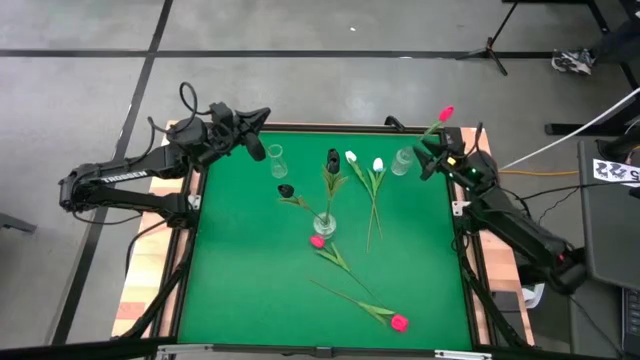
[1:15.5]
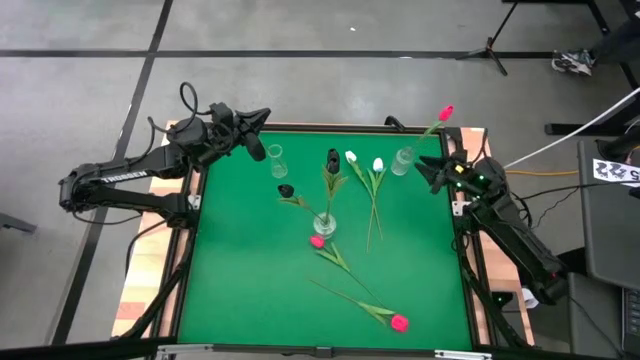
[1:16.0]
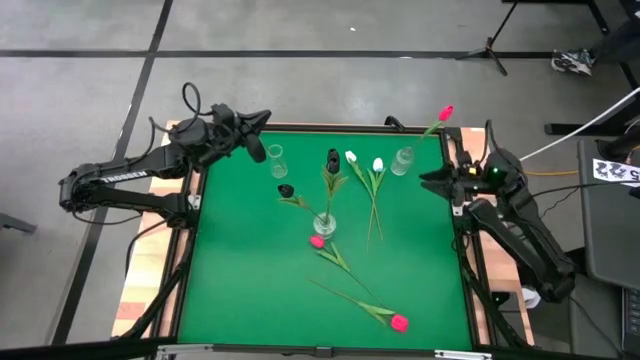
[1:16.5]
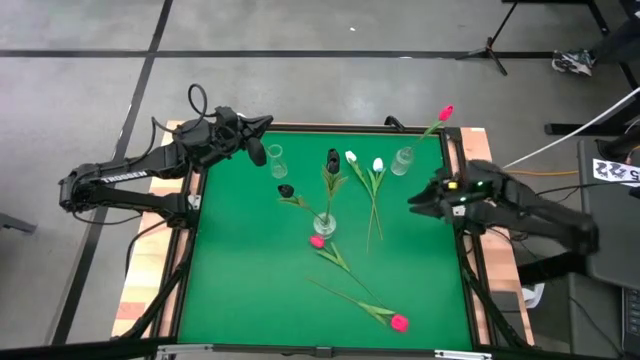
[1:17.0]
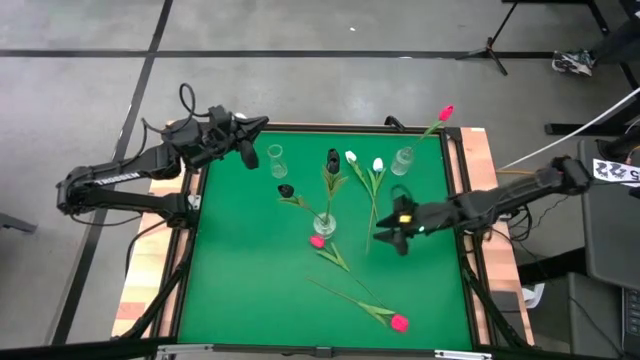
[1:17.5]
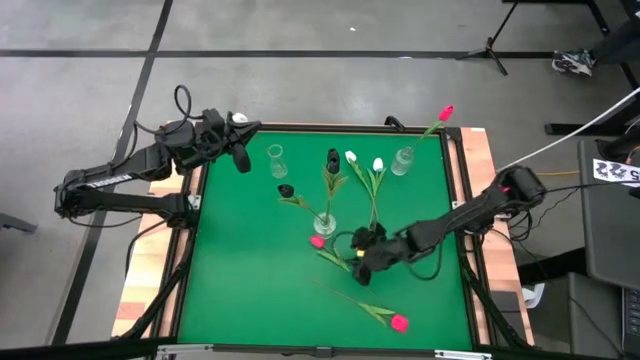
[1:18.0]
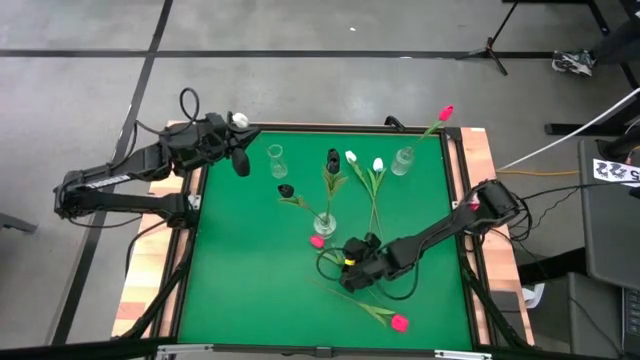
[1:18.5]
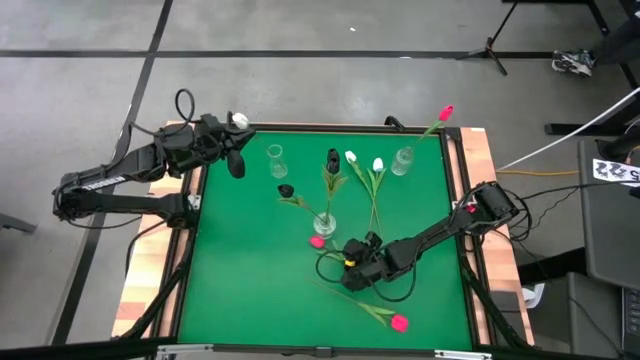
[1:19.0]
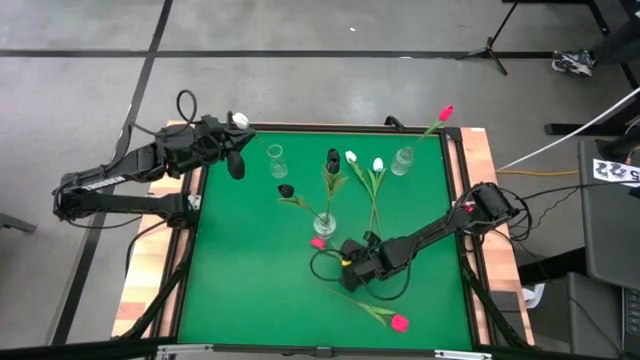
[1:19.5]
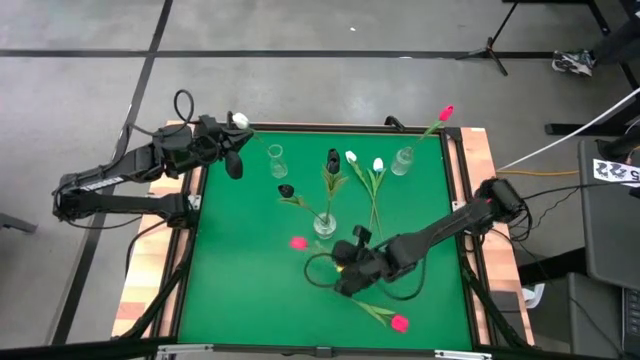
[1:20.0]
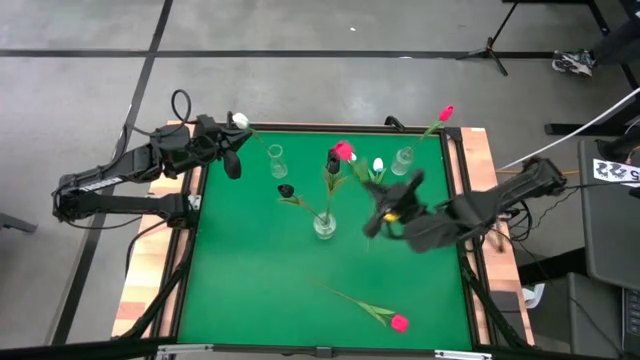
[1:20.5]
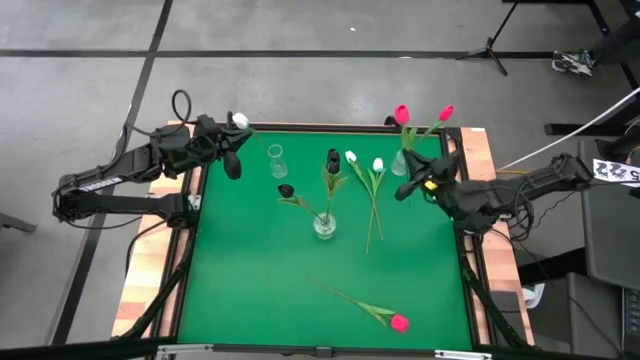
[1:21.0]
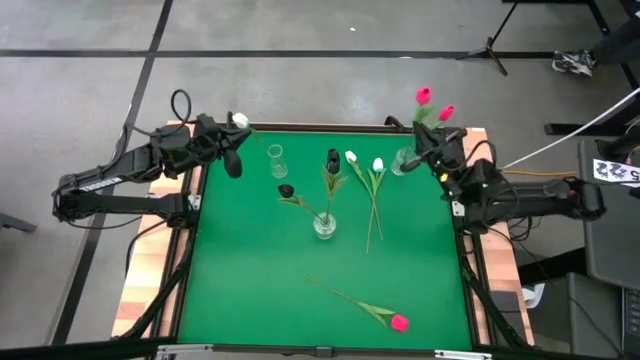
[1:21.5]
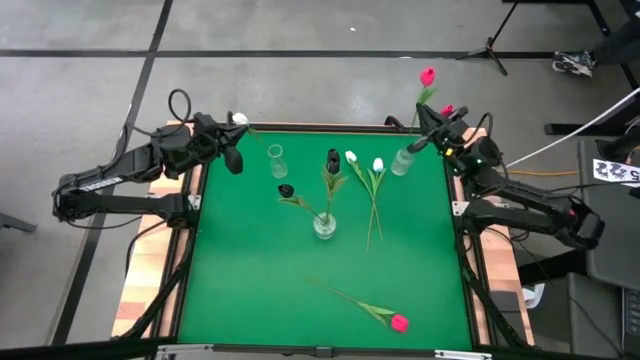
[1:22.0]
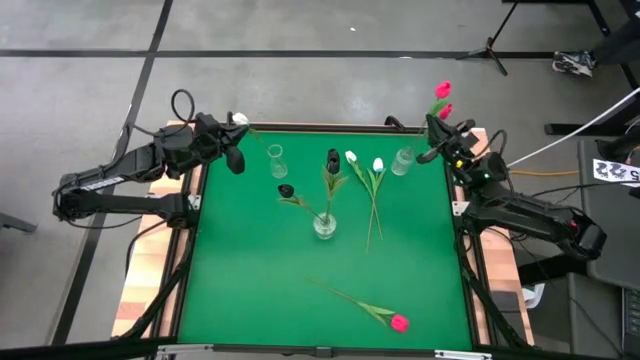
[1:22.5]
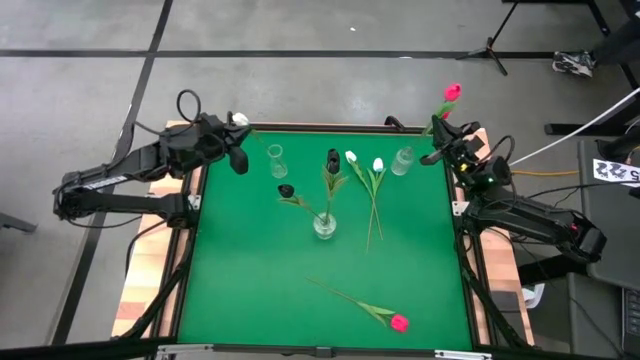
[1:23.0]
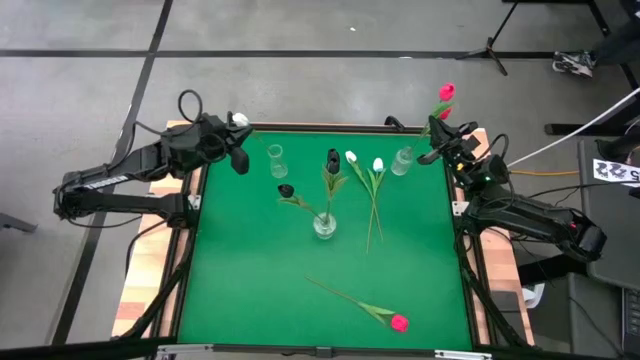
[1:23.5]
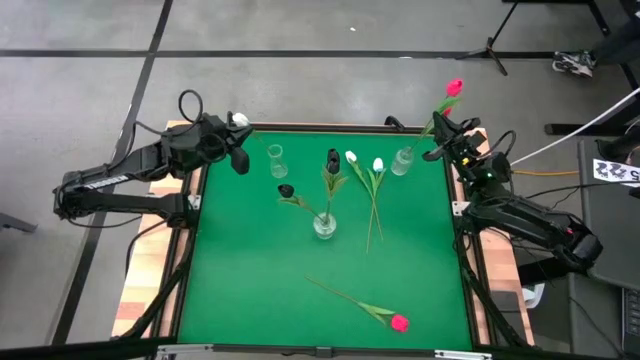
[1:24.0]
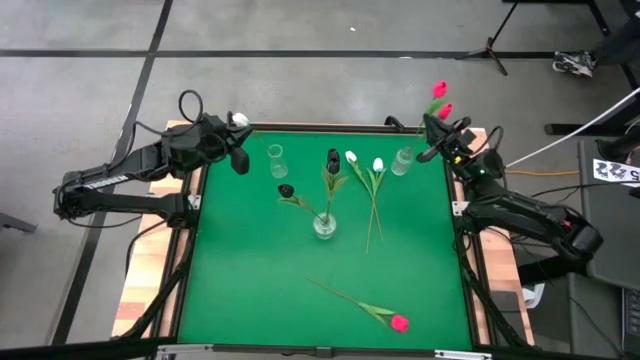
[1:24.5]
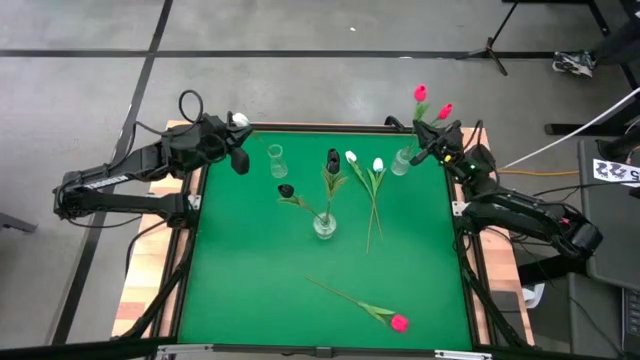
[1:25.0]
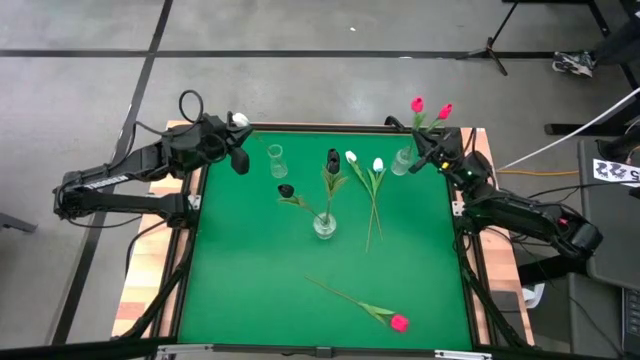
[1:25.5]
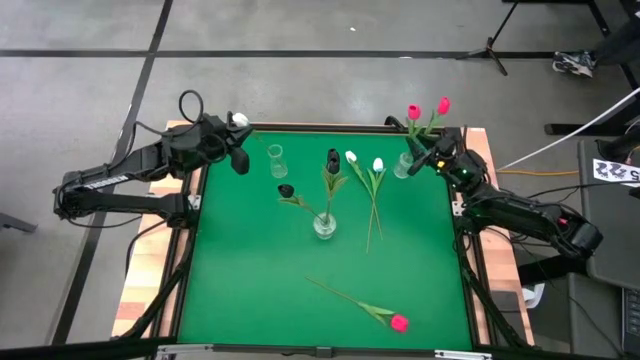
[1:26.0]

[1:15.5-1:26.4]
Task: Sort flowers into vase by color
Put the top pink tulip into the top right transparent vase

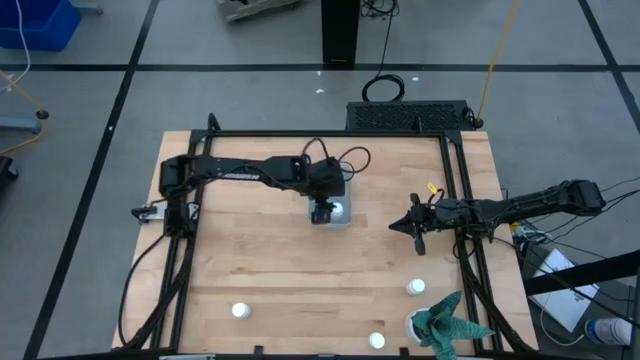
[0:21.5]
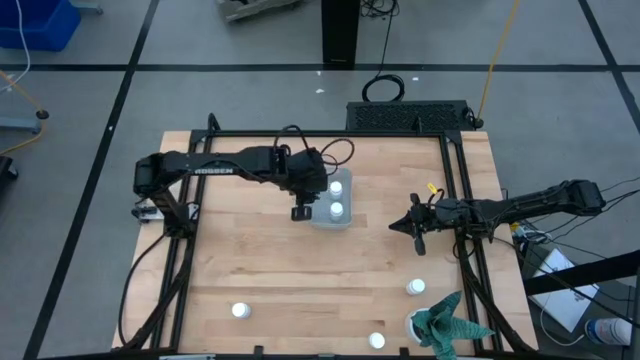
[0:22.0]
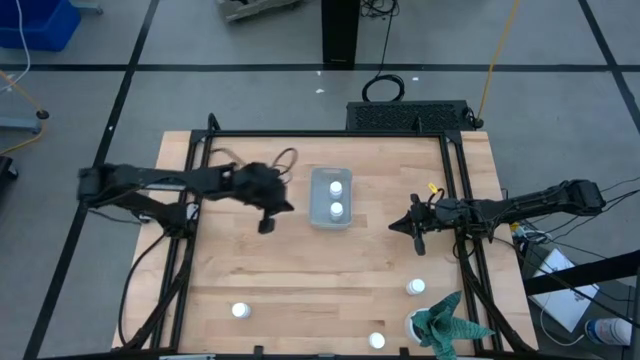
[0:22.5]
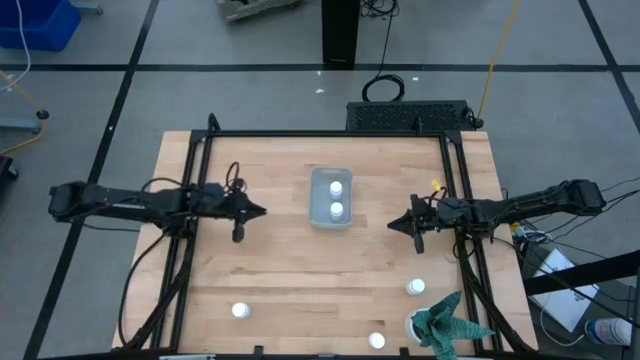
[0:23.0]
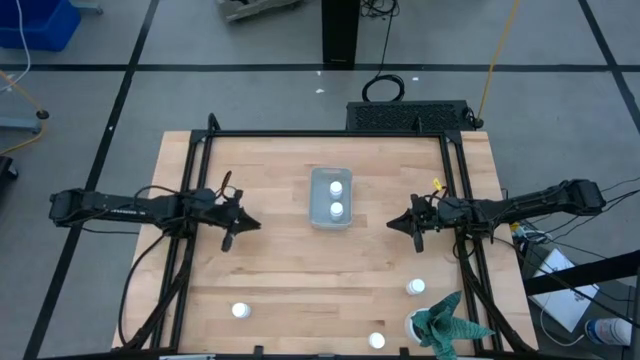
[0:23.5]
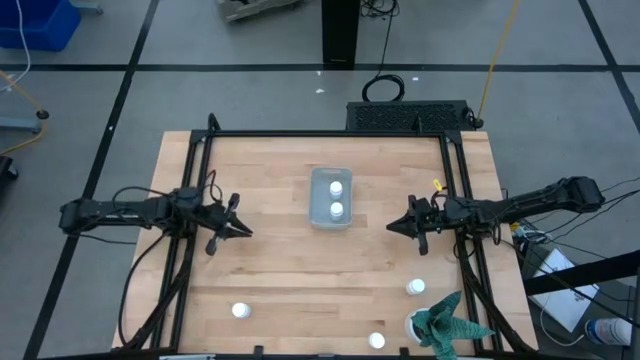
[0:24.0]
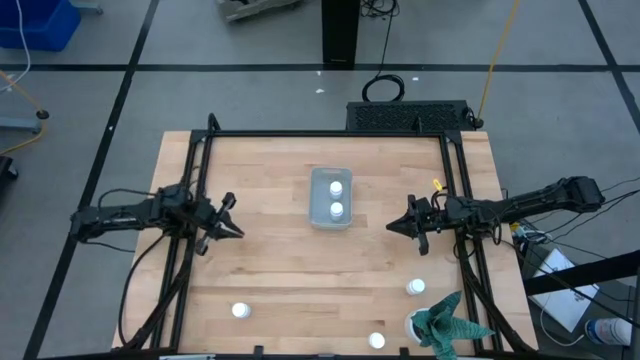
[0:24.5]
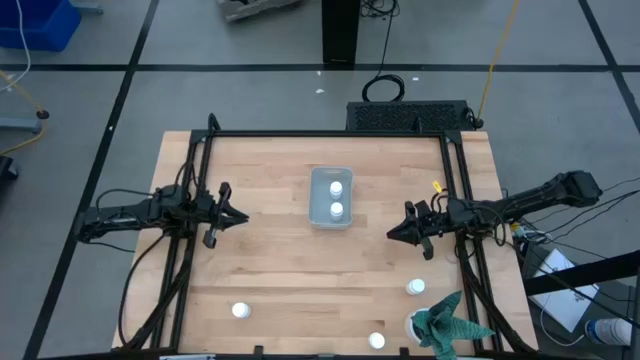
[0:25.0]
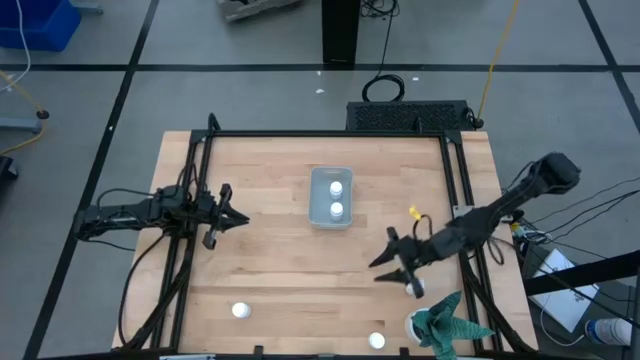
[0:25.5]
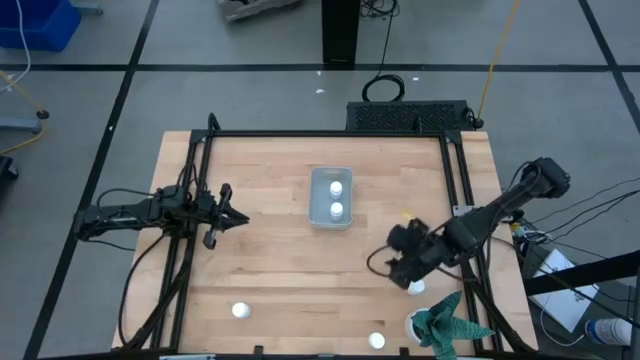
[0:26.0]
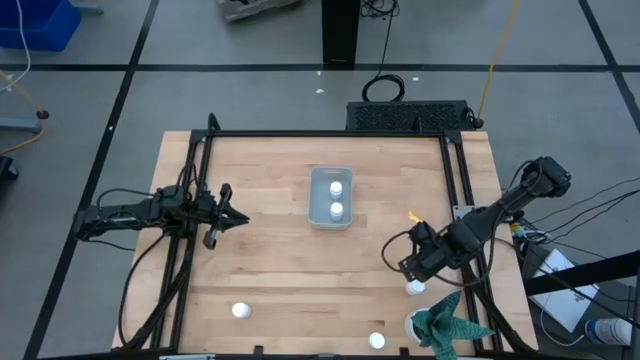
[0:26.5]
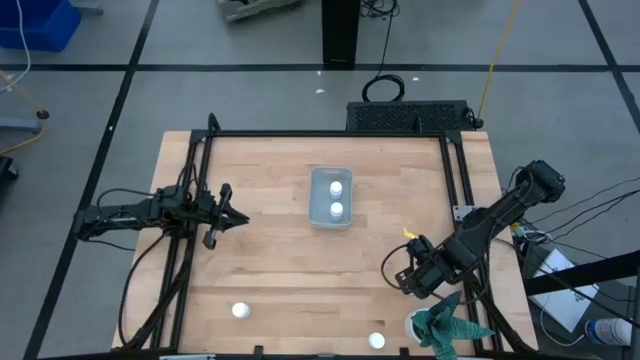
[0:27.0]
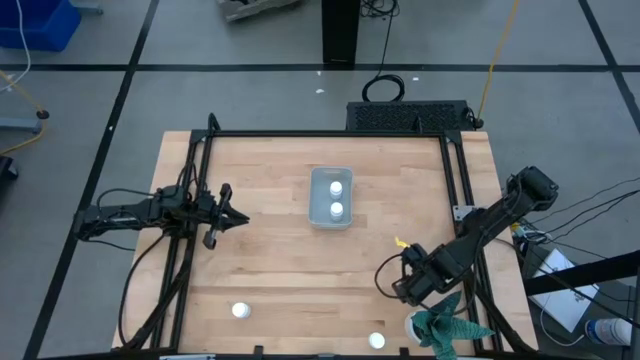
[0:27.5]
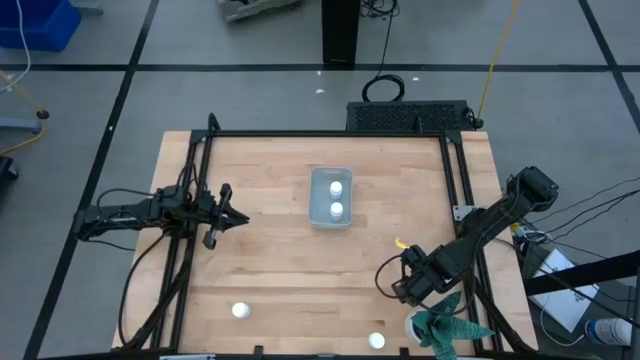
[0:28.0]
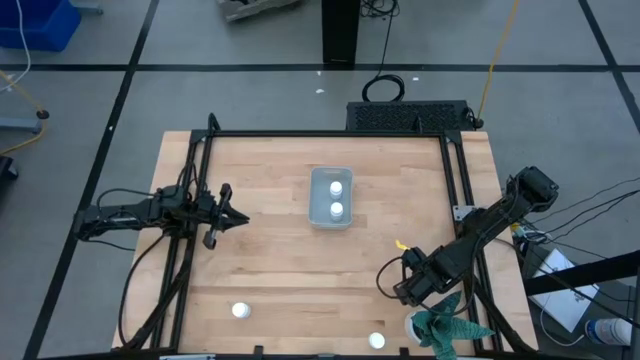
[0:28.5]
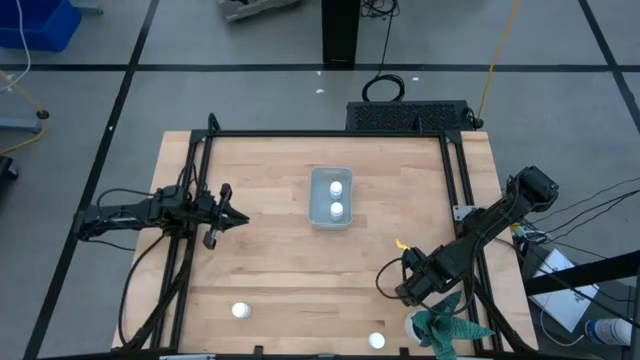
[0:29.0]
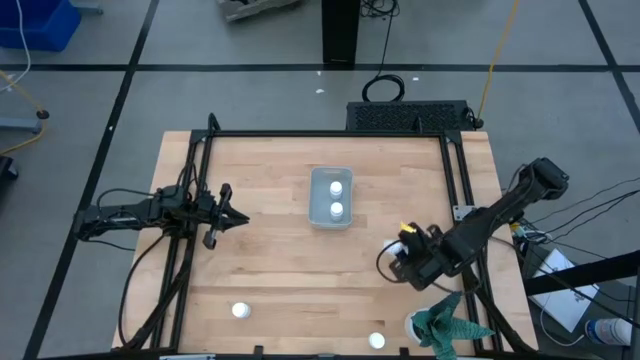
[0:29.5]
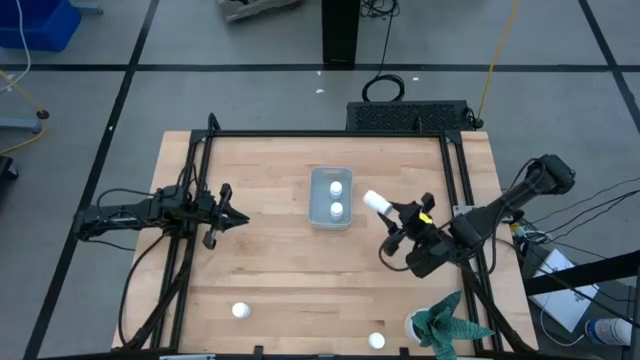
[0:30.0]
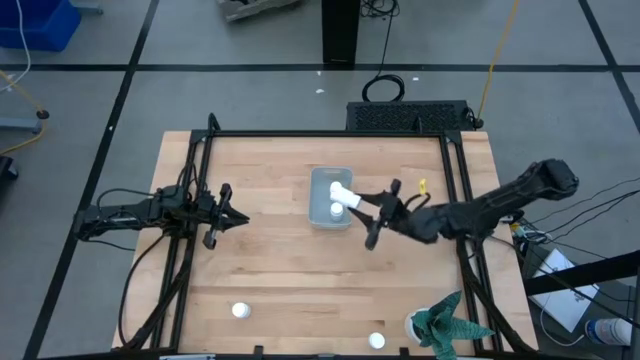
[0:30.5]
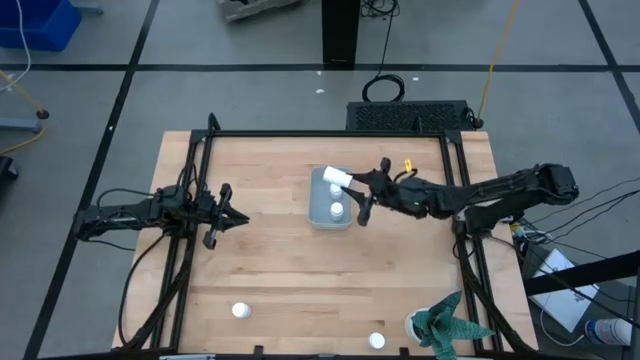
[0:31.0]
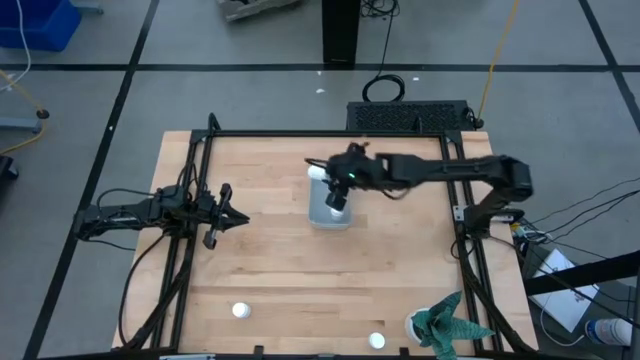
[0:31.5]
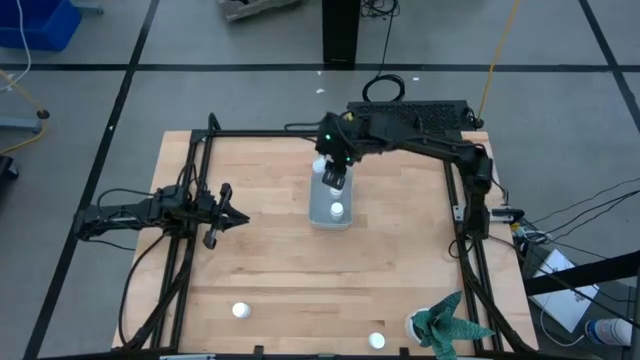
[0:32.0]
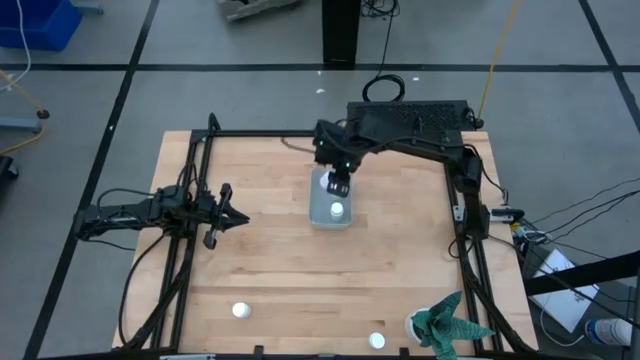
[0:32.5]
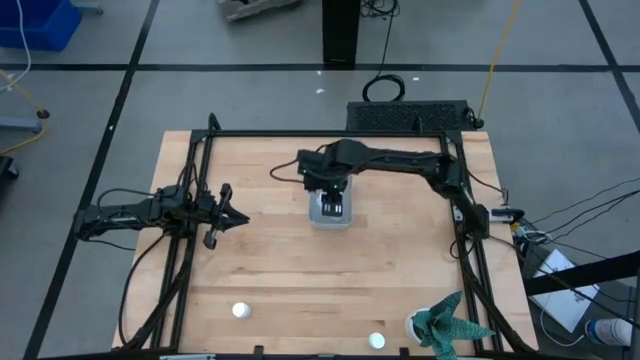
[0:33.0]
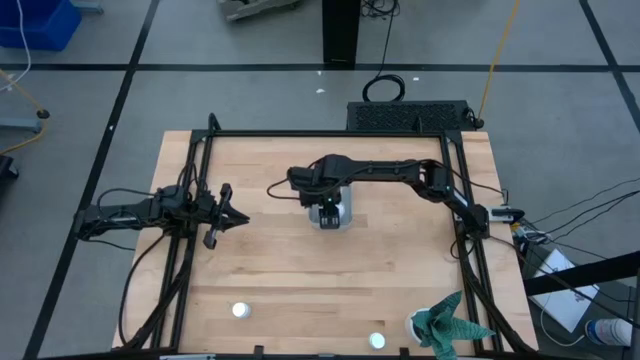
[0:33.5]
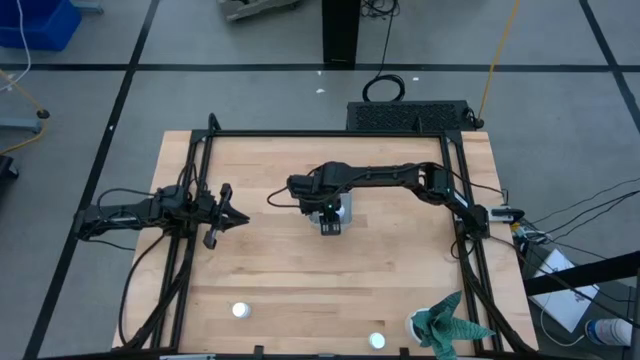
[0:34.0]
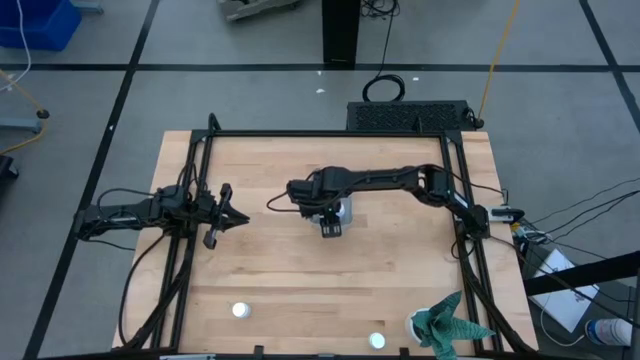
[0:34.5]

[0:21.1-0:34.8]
Task: Pick and place pill bottles into a basket
Put the white pill bottle into the gray bin
